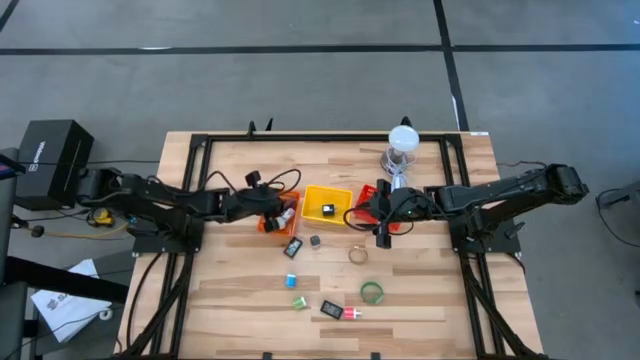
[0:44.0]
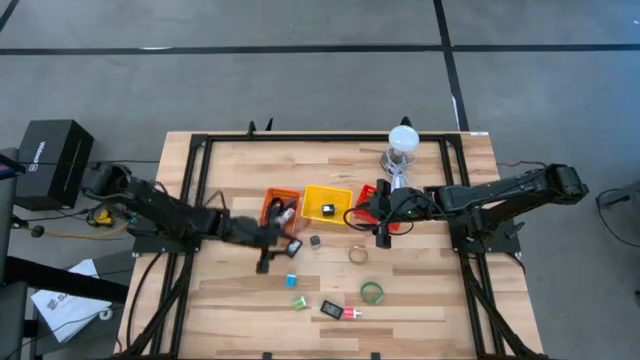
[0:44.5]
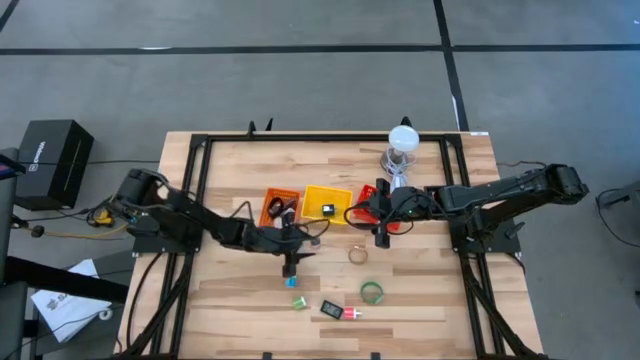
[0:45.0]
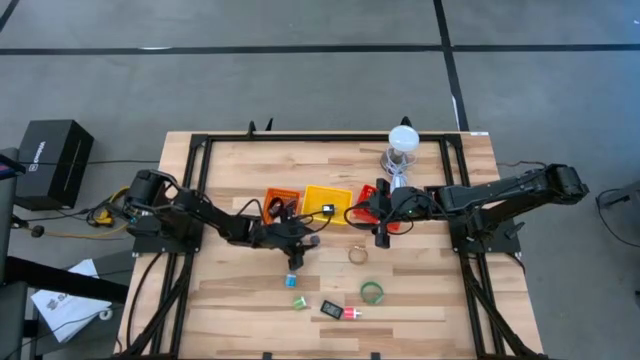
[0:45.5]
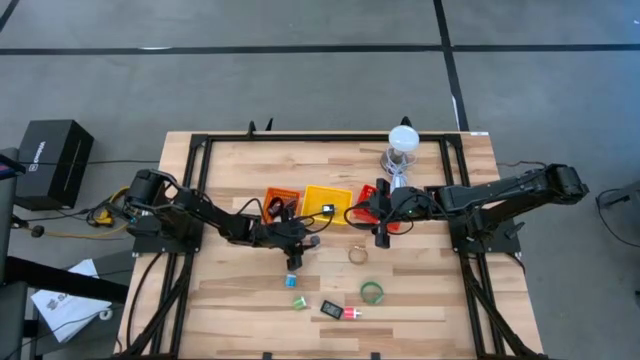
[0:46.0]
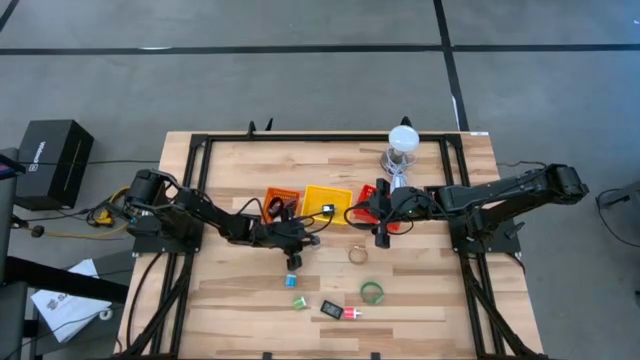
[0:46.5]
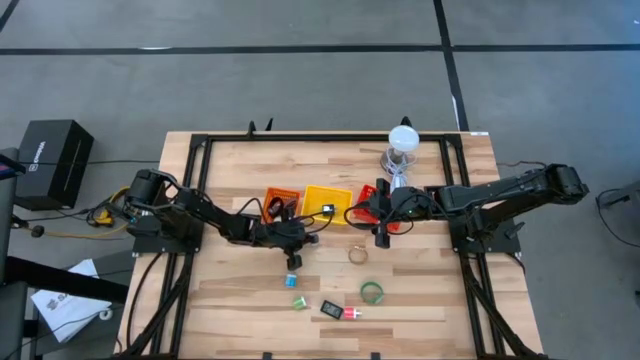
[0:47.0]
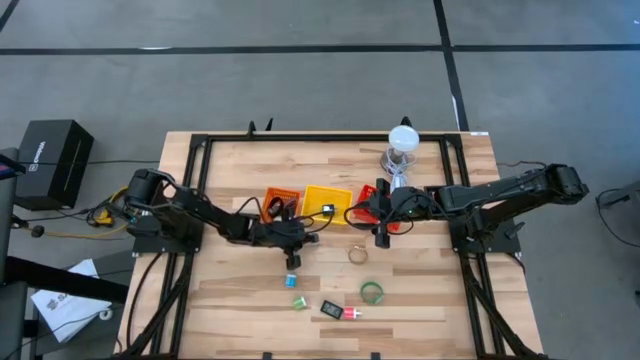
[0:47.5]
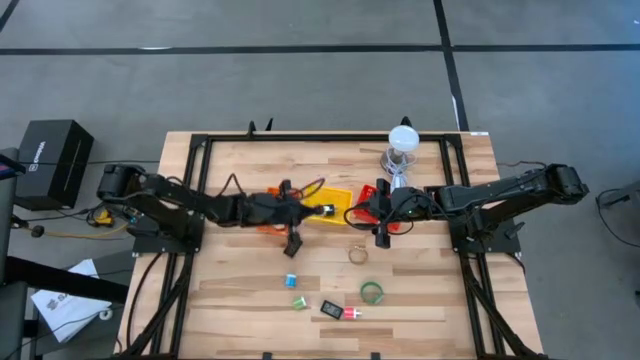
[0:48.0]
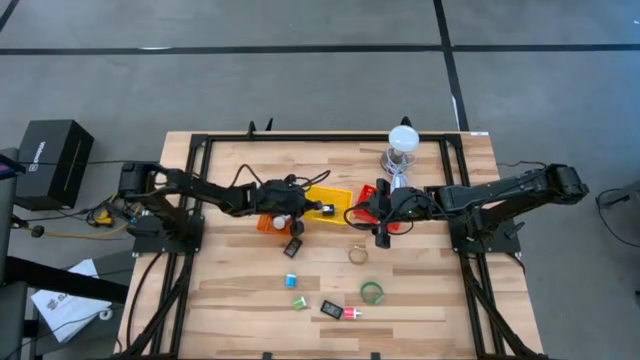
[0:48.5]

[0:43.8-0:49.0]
Task: Pick & Place Office items
Put the white charger adapter into the yellow bin

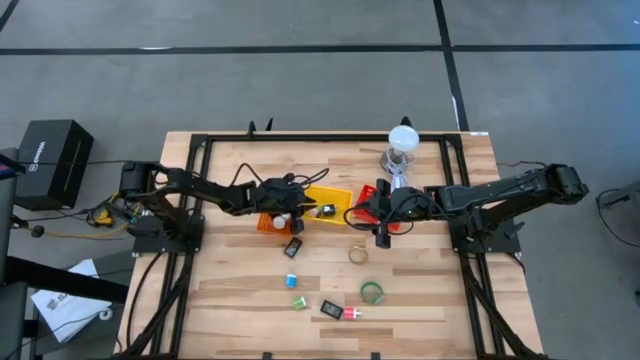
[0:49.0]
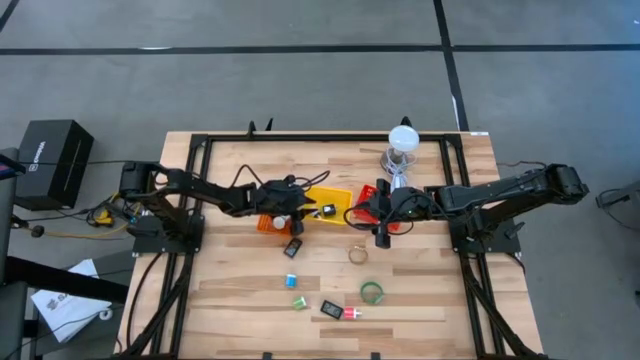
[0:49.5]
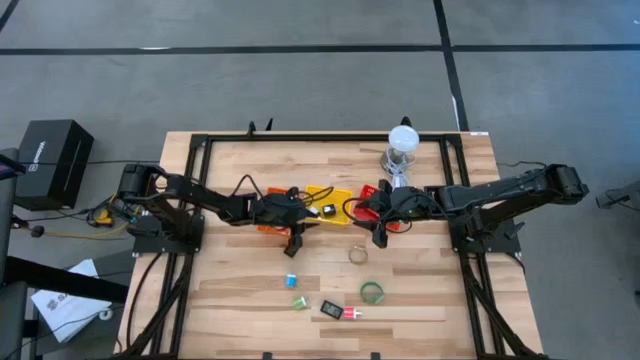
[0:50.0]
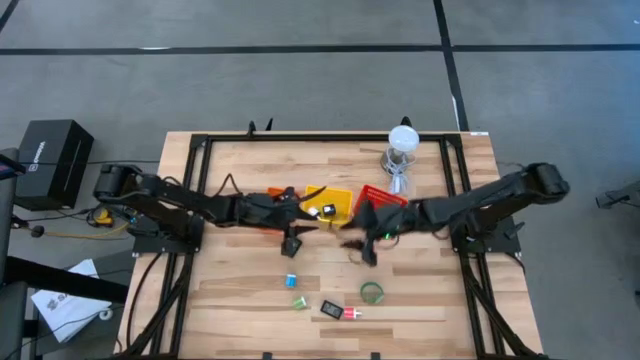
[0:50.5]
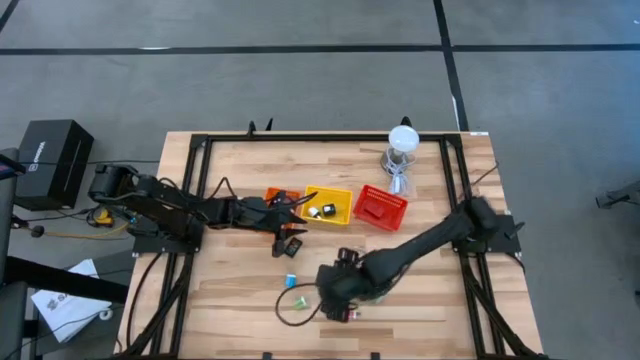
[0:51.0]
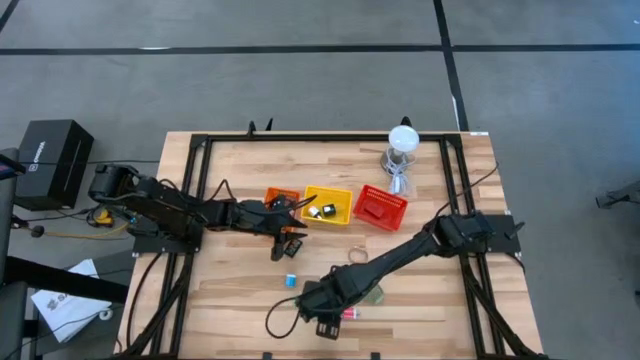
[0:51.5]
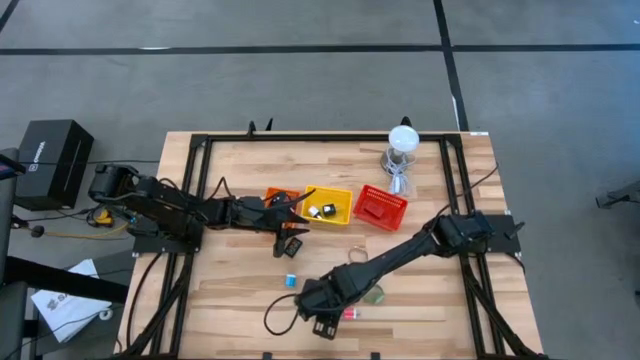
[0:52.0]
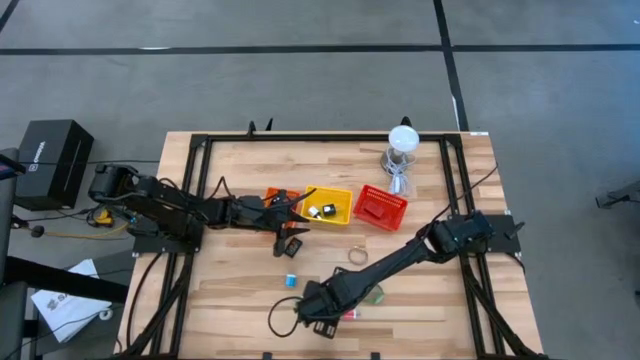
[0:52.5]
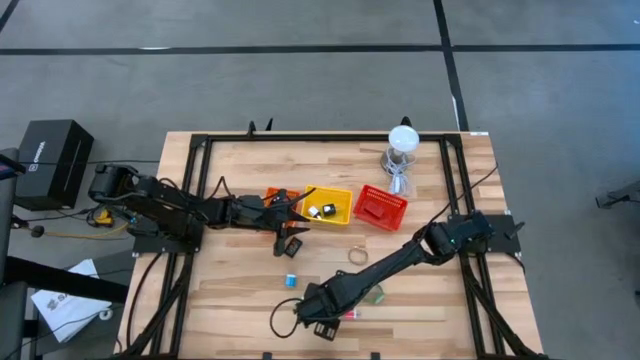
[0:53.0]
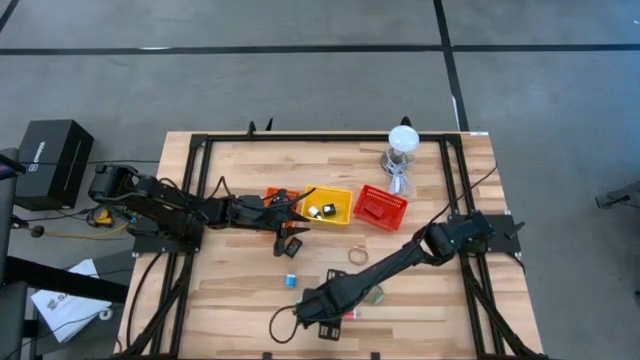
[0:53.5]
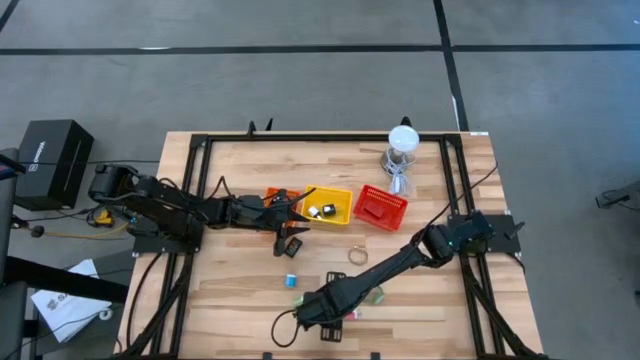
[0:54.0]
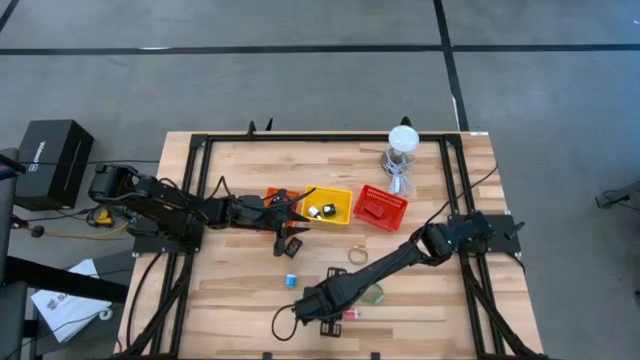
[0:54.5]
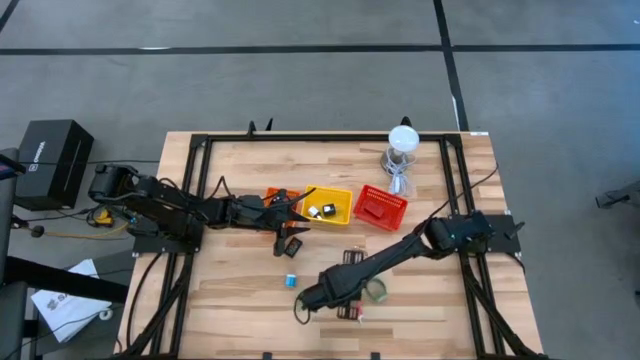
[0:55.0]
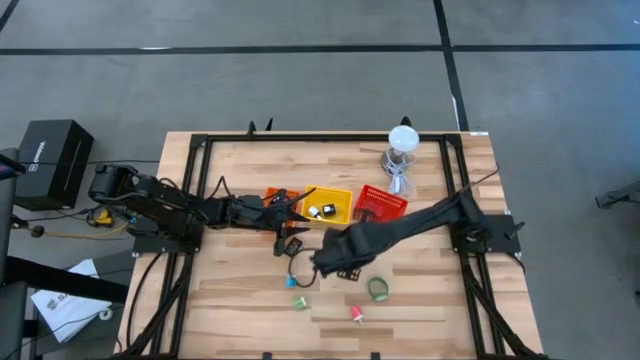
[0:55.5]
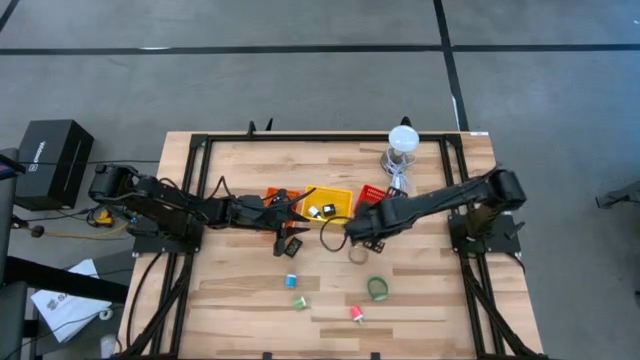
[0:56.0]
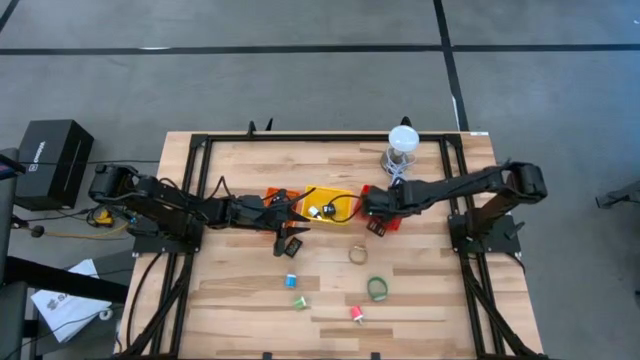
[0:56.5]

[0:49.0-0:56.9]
Put the black digital timer into the red bin

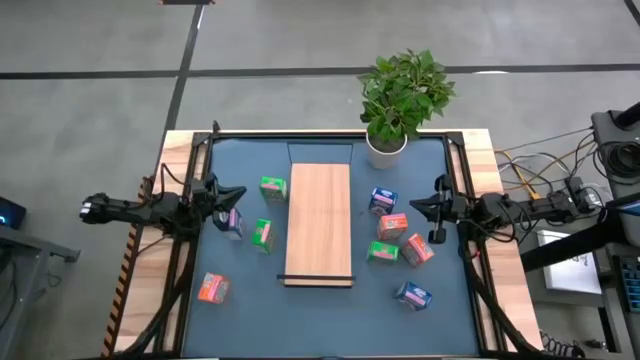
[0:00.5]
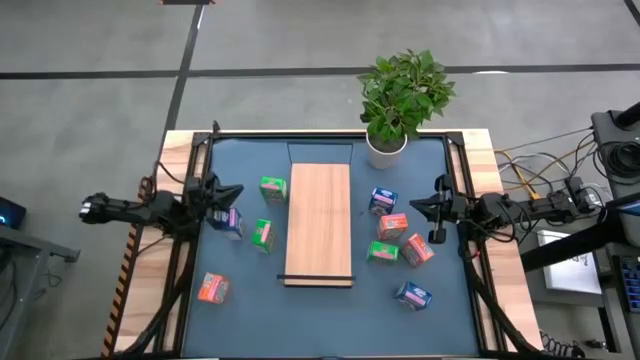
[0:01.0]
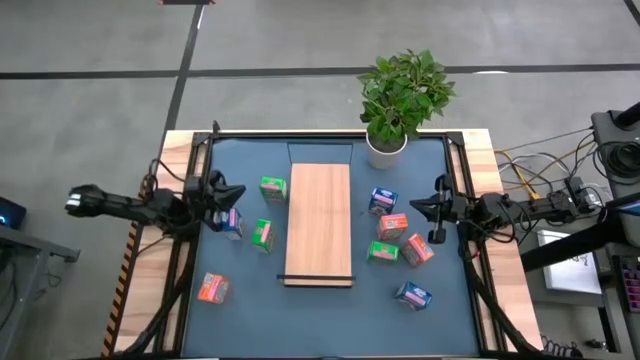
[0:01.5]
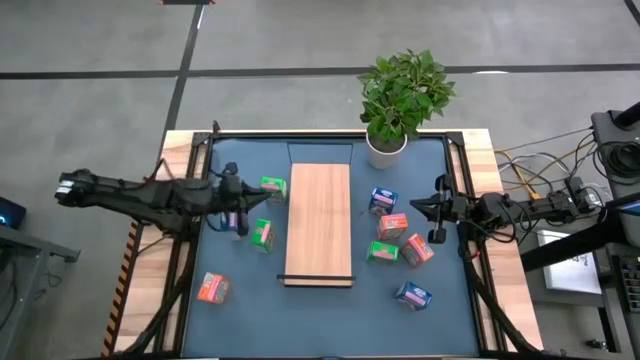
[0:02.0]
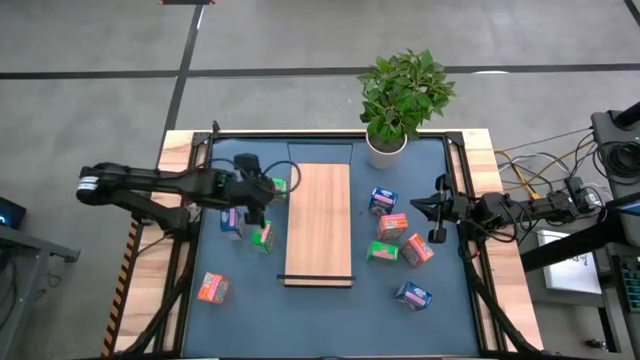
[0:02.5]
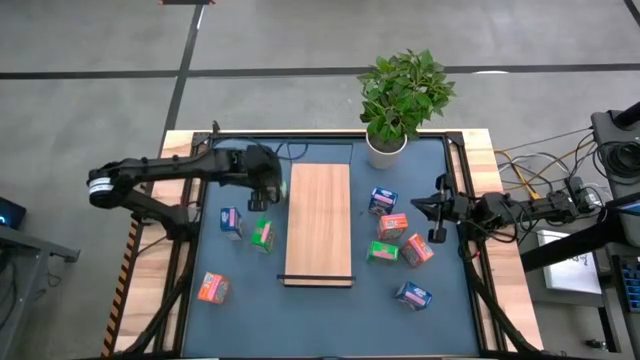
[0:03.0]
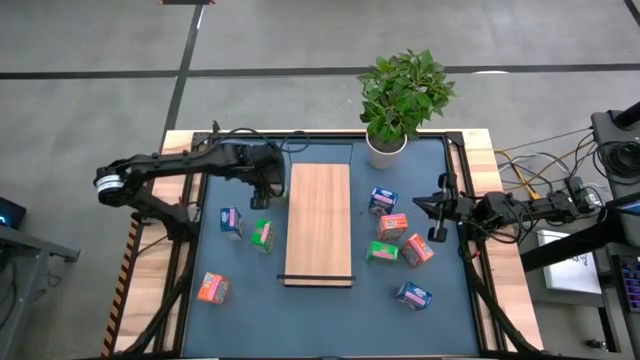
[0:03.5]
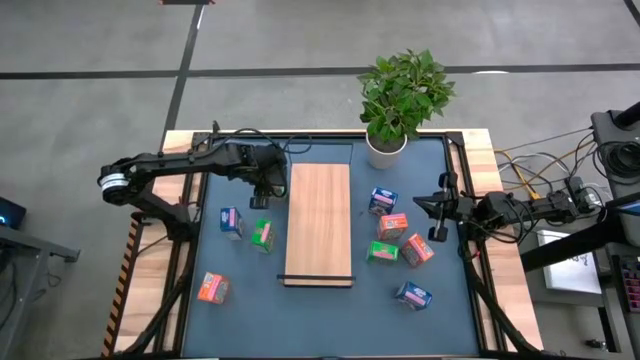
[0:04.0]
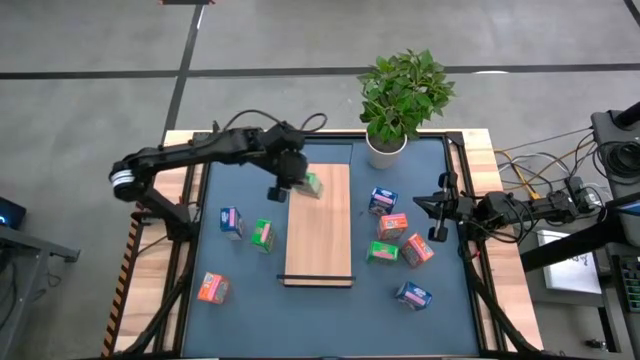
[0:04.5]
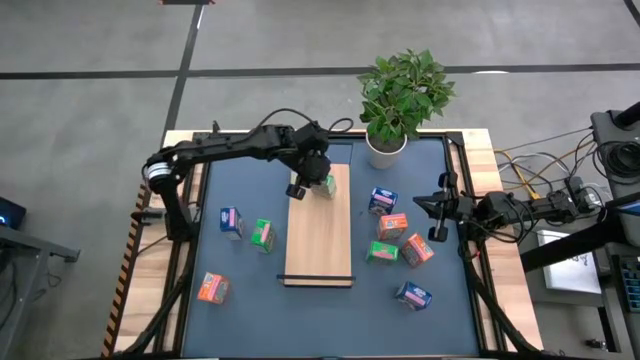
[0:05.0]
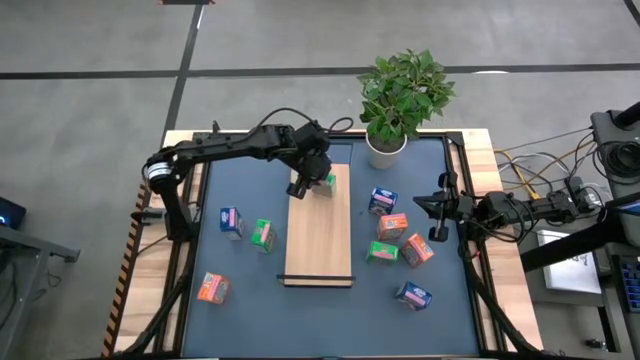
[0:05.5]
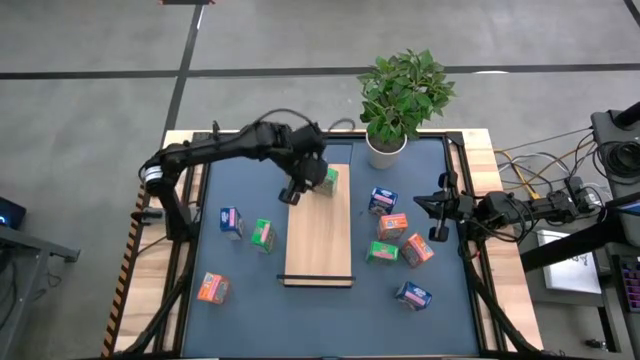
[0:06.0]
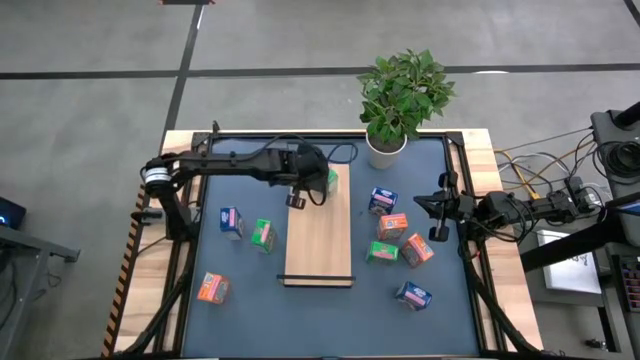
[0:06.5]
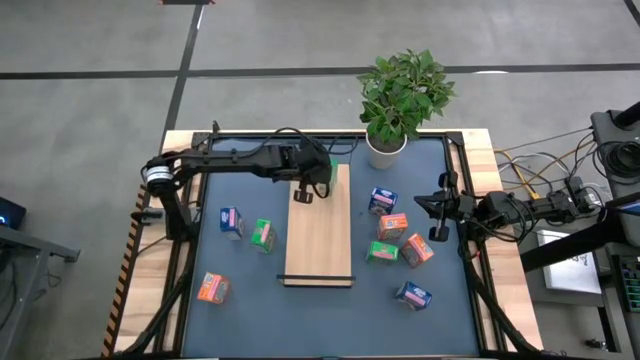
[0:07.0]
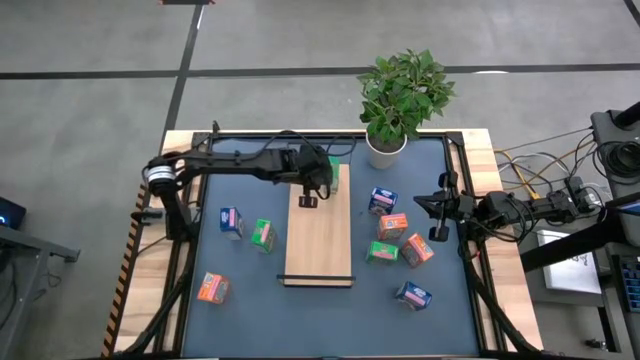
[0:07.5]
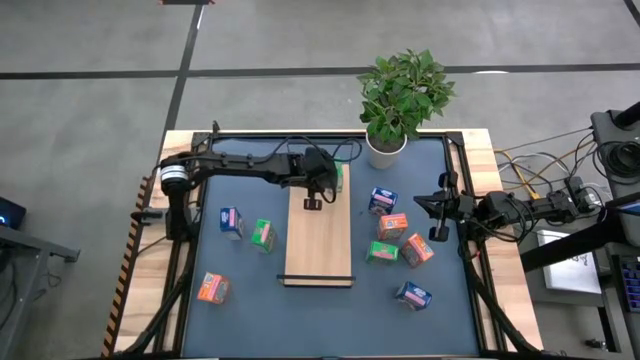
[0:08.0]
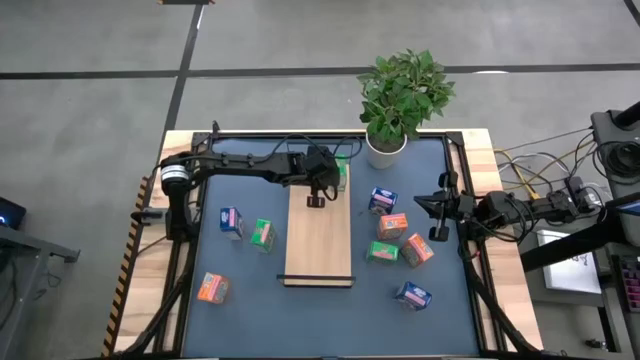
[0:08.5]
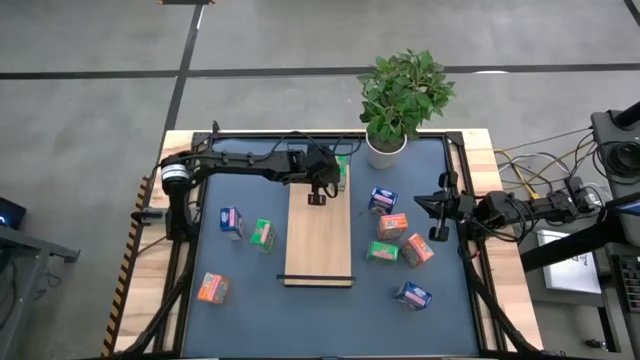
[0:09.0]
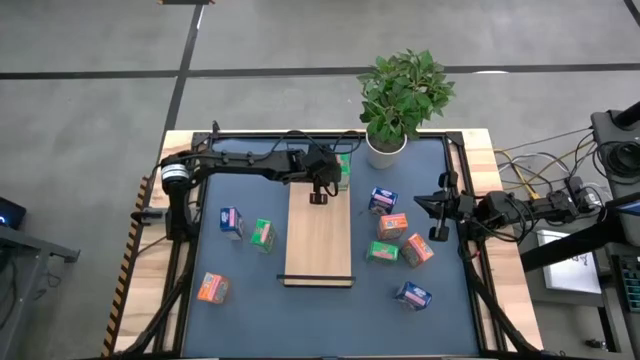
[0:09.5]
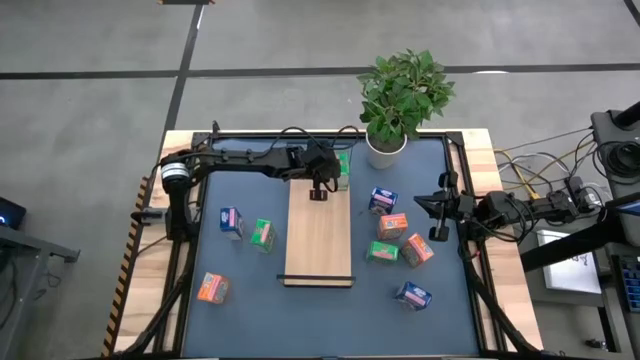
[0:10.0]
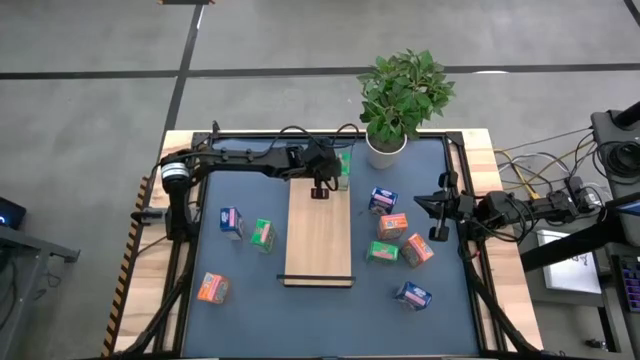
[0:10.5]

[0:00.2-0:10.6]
Task: Stack cereal on shelf
Put the top left green cereal box on the shelf
